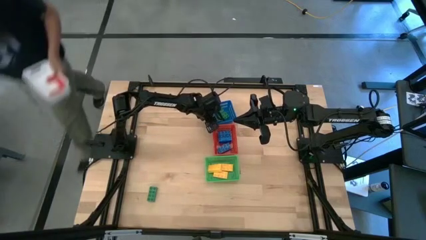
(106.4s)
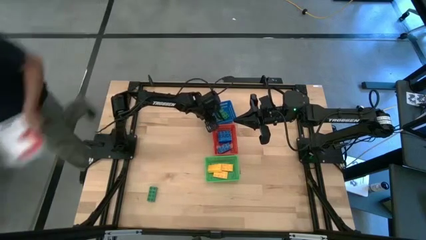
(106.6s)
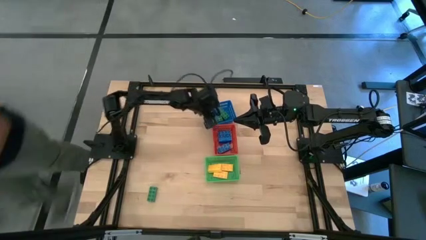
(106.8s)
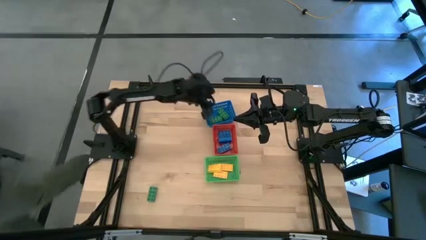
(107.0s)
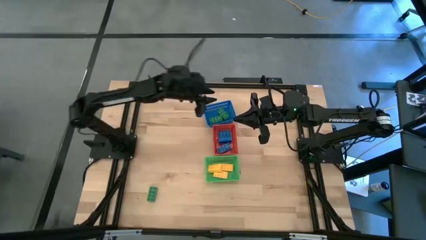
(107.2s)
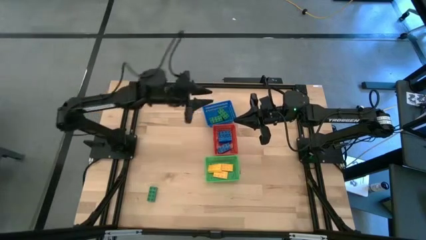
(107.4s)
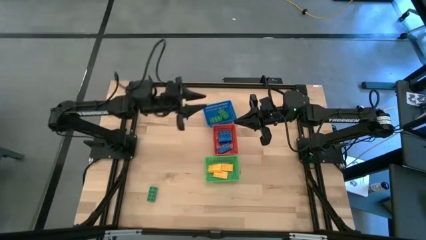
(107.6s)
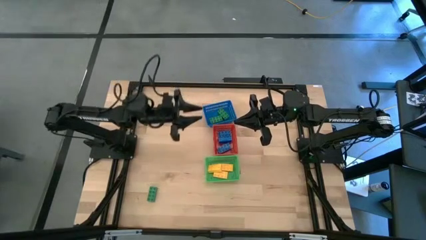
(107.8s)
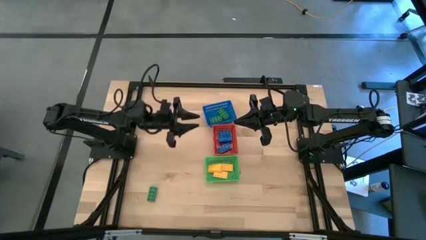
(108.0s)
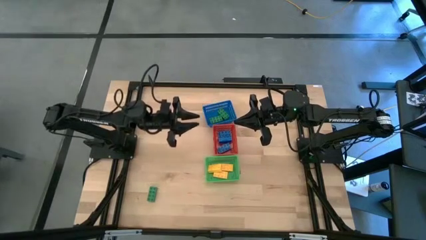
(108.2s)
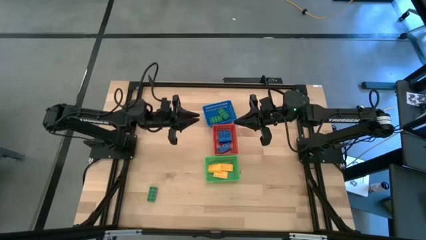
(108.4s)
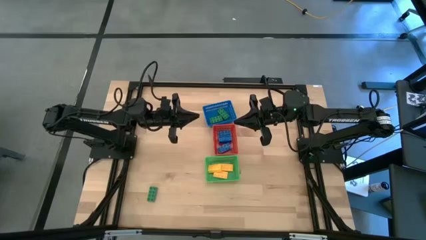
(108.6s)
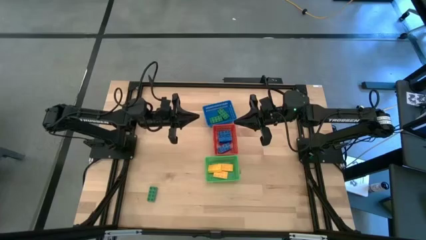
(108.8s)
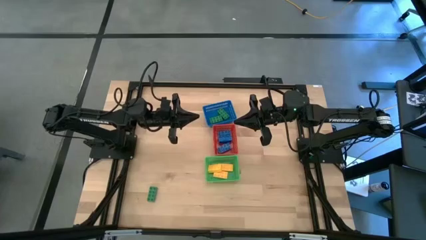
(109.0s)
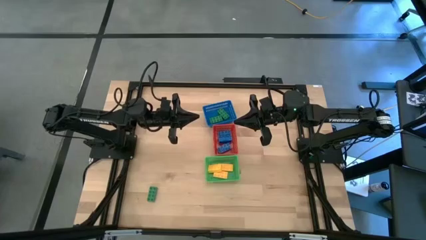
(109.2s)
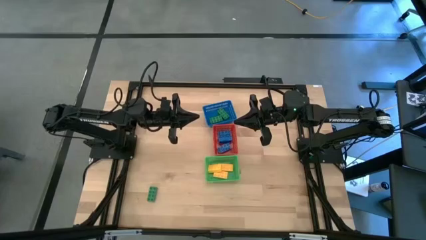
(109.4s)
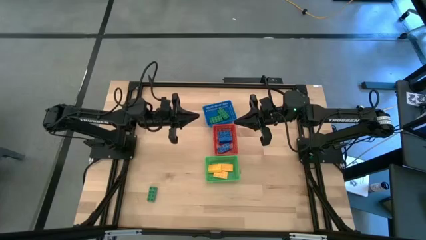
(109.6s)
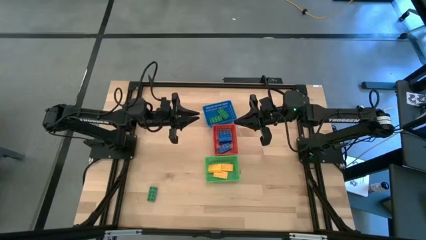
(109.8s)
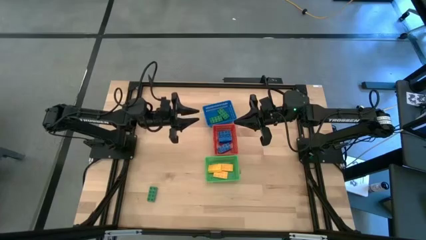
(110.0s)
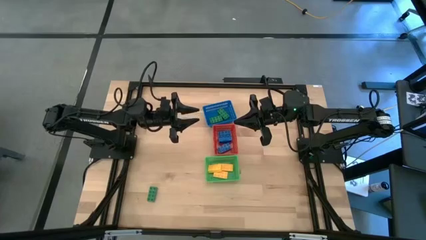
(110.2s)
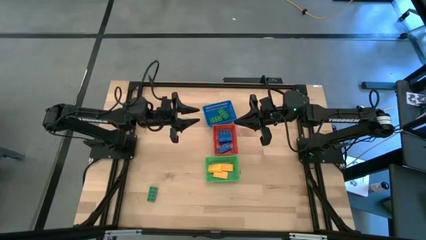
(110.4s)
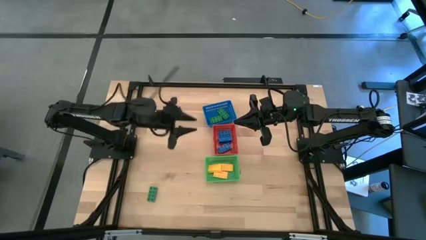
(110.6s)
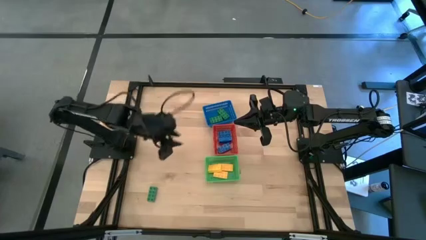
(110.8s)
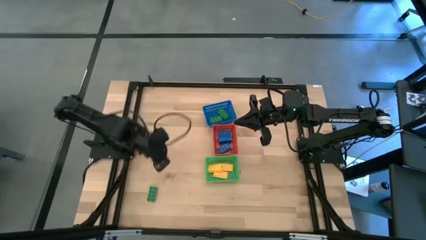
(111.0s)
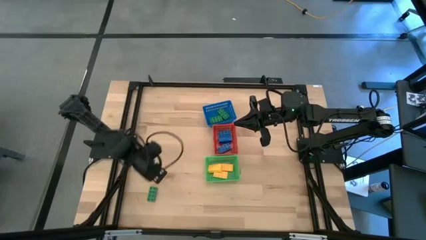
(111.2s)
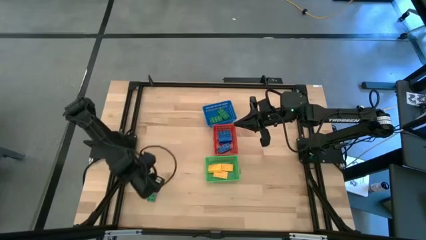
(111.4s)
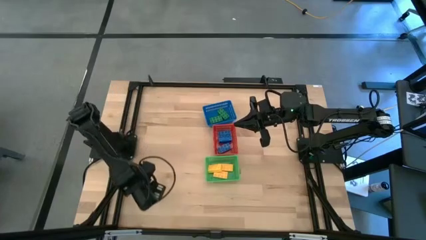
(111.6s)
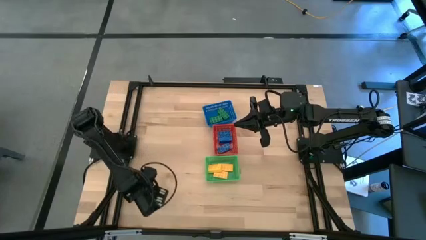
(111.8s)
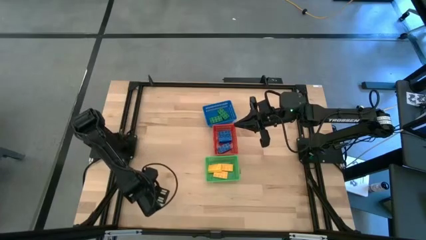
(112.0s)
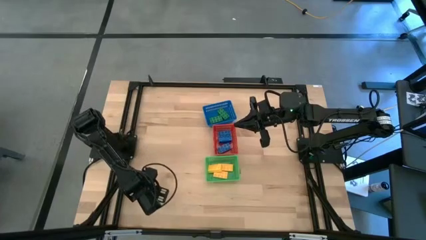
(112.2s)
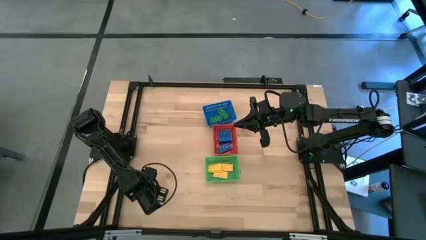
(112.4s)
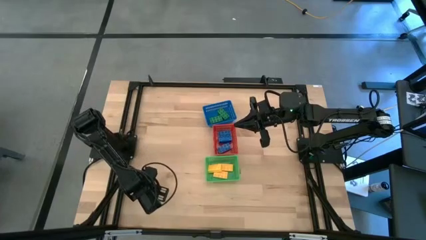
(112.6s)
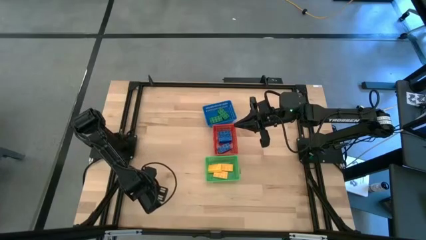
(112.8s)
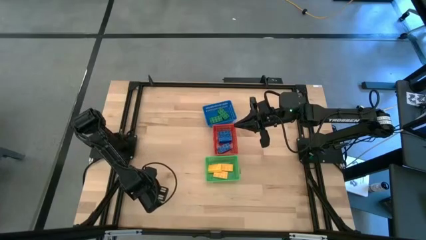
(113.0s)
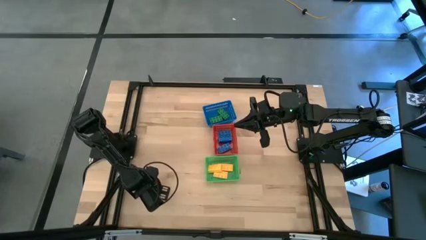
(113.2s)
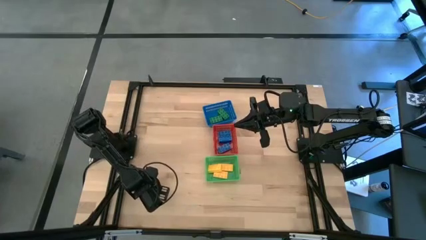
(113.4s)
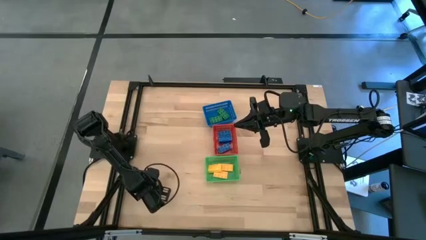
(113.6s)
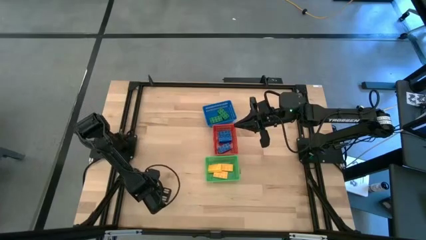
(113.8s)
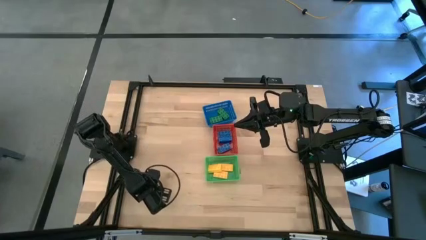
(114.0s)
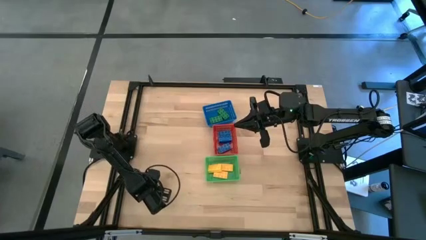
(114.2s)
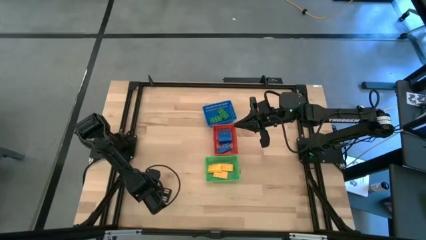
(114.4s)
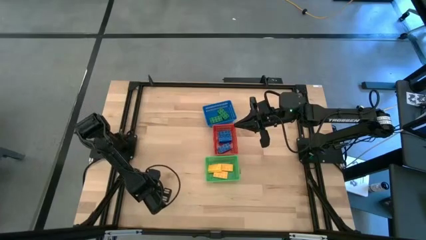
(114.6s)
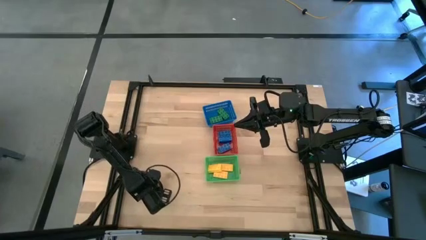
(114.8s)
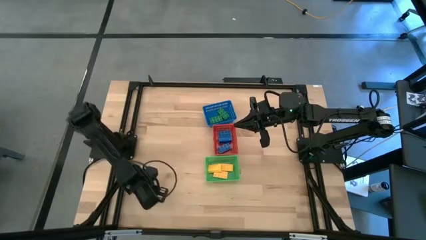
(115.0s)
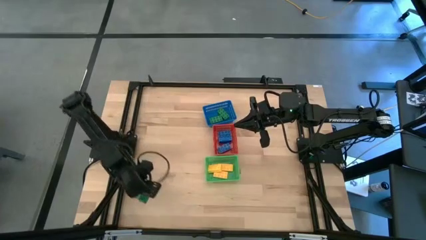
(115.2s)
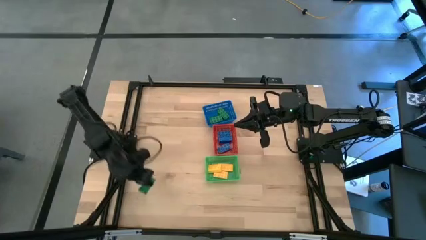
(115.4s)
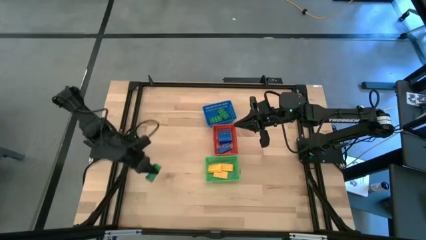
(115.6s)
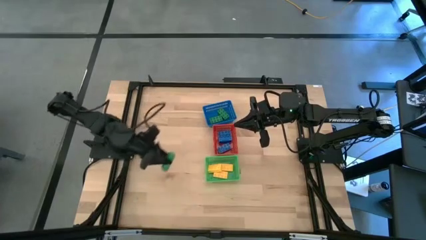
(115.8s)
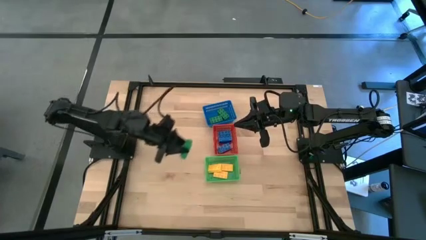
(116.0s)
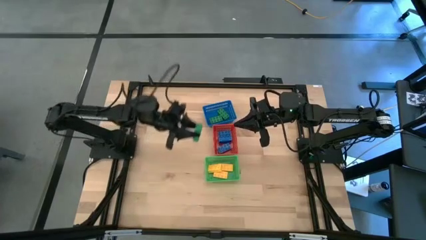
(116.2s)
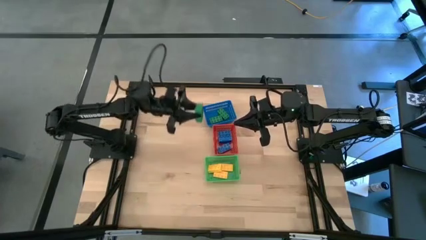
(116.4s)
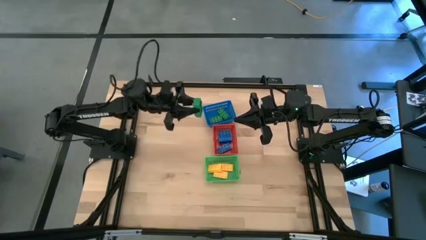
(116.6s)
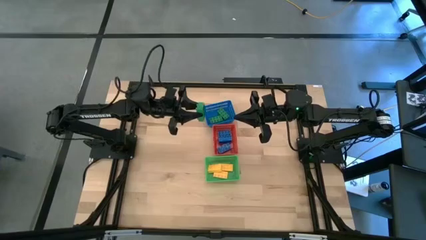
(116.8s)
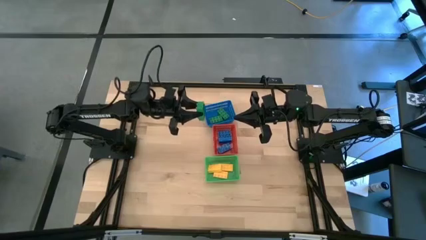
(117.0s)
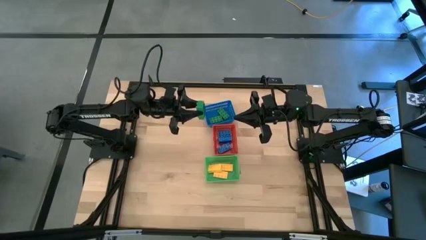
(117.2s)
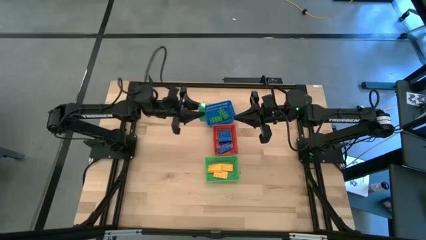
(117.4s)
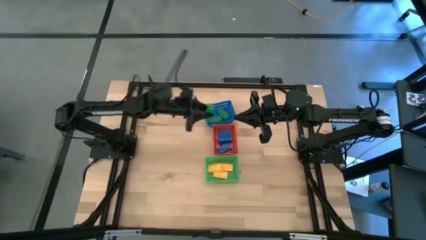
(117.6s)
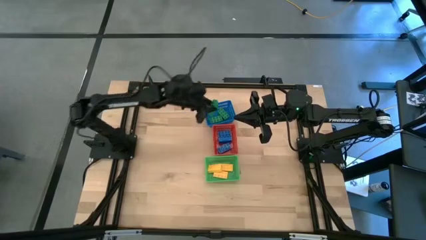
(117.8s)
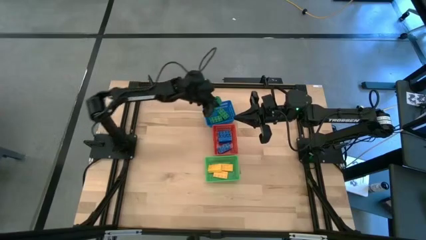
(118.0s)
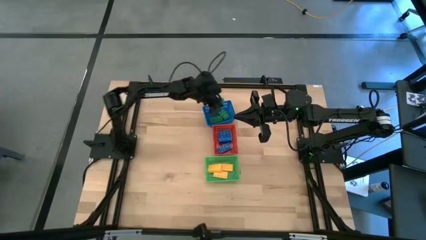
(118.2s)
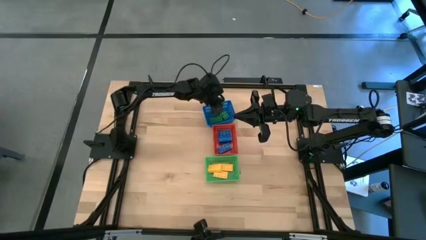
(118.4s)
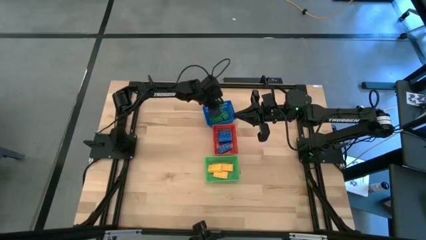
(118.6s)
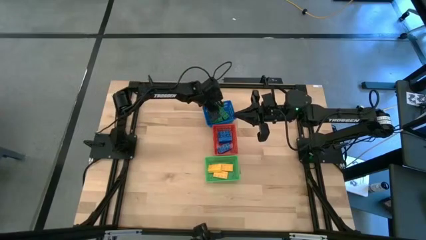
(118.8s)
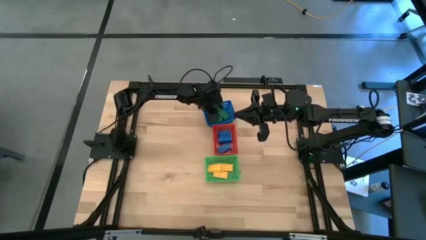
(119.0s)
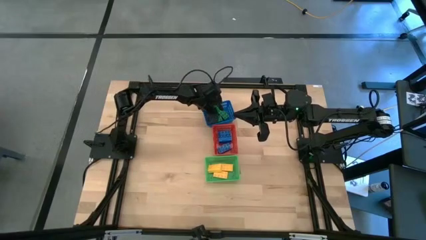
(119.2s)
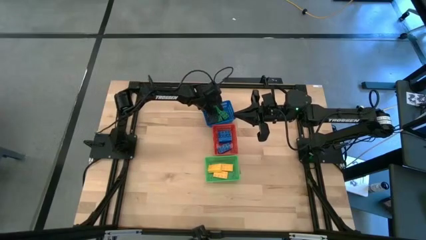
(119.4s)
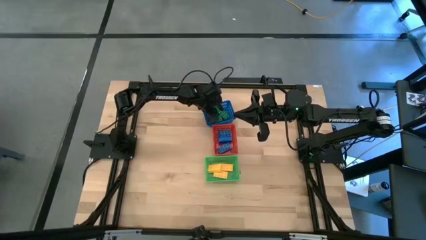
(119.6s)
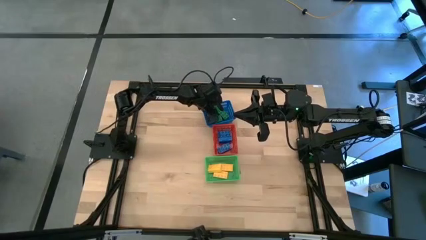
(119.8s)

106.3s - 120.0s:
Task: Sort & place blocks by color
Put the green game piece into the blue basket
